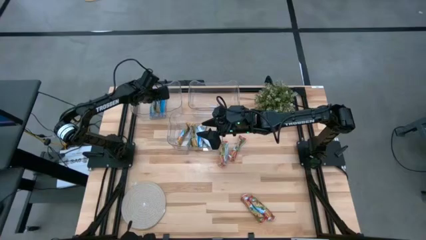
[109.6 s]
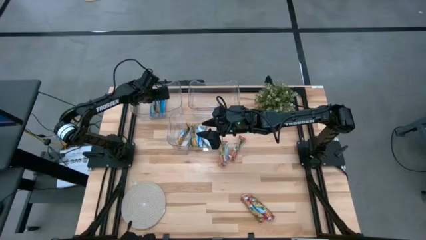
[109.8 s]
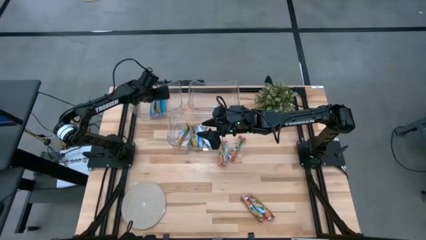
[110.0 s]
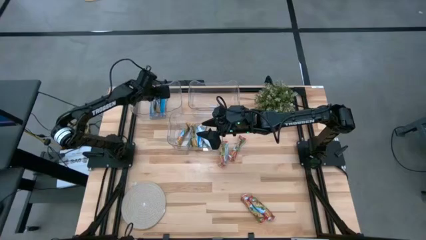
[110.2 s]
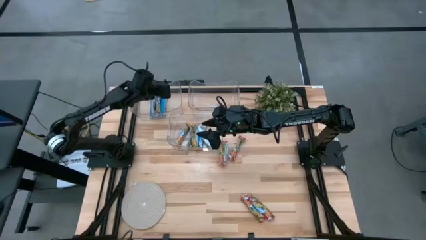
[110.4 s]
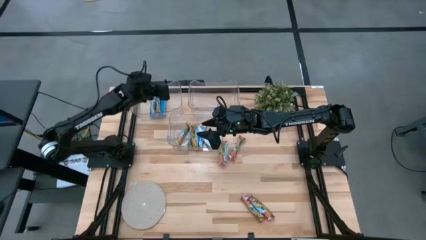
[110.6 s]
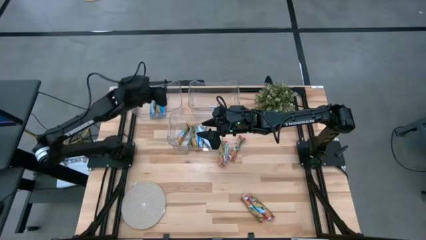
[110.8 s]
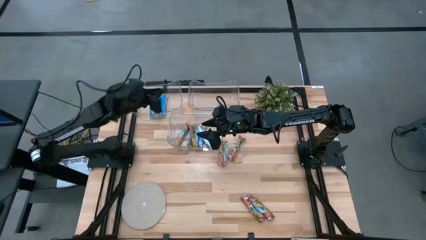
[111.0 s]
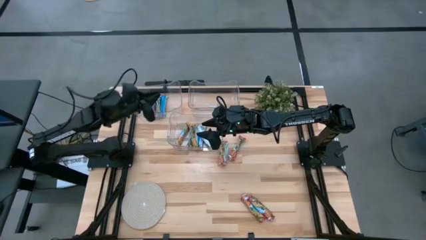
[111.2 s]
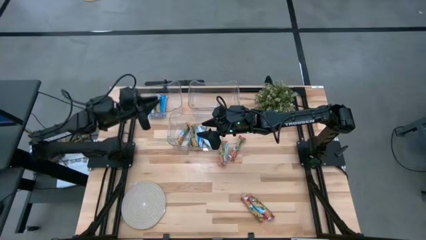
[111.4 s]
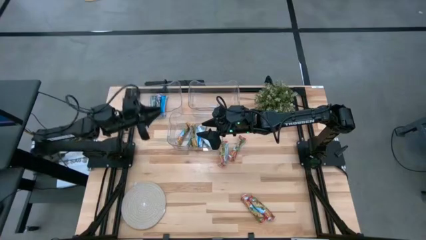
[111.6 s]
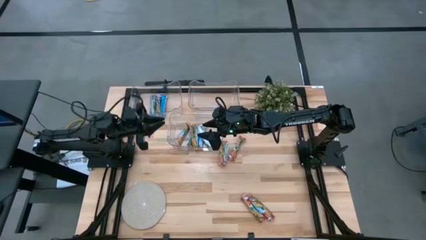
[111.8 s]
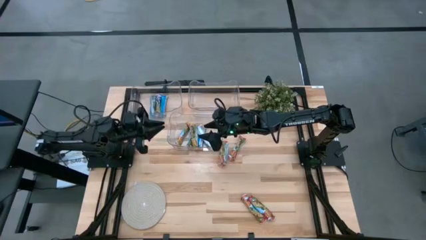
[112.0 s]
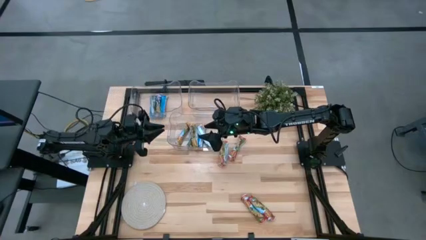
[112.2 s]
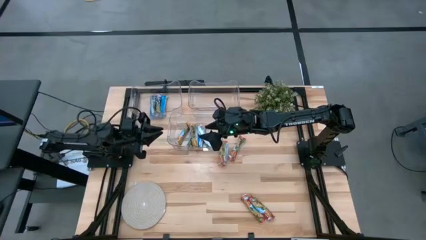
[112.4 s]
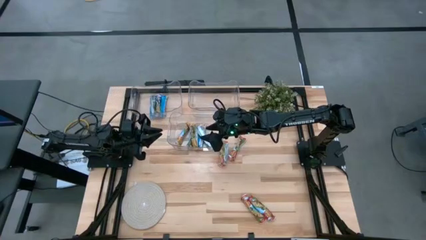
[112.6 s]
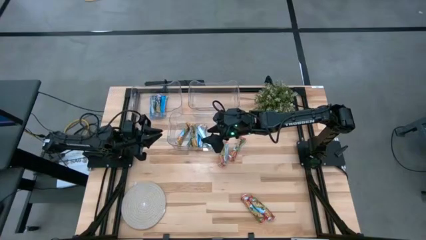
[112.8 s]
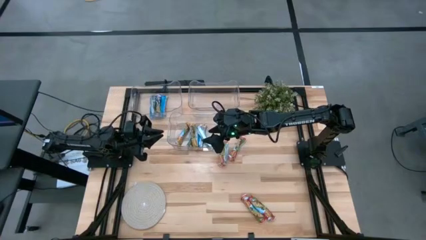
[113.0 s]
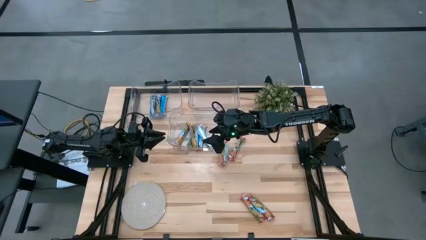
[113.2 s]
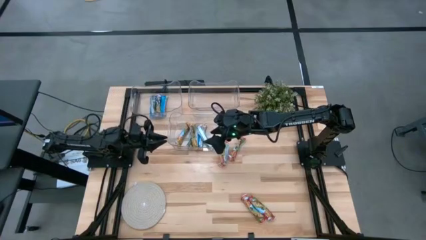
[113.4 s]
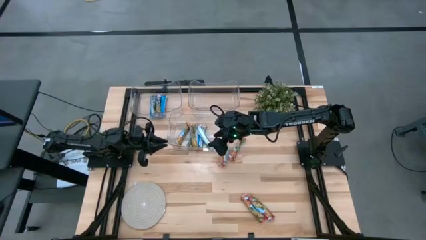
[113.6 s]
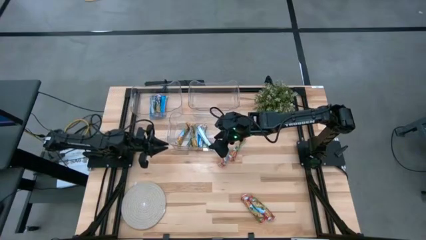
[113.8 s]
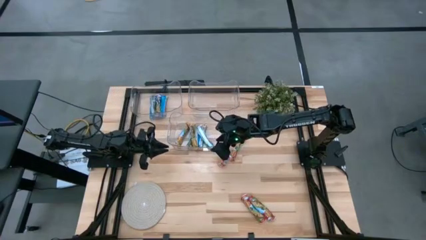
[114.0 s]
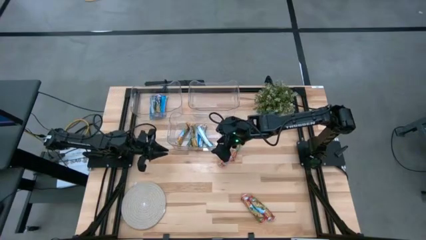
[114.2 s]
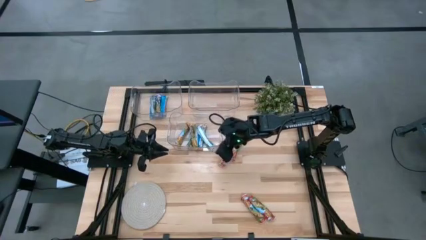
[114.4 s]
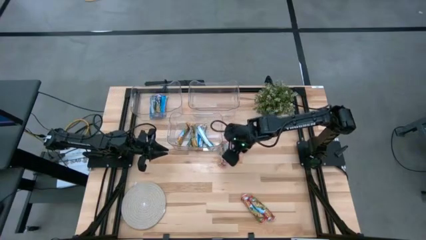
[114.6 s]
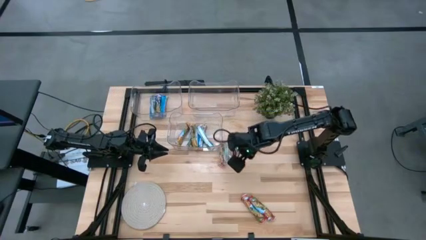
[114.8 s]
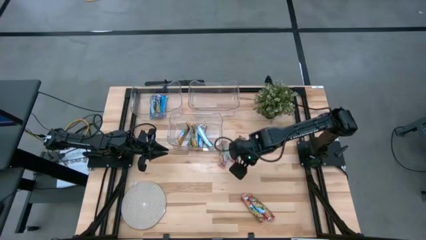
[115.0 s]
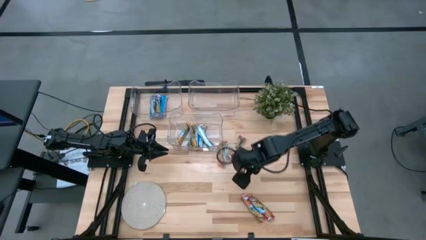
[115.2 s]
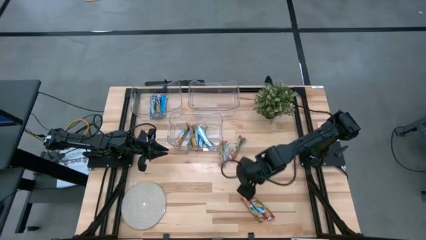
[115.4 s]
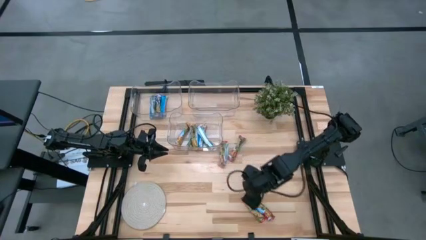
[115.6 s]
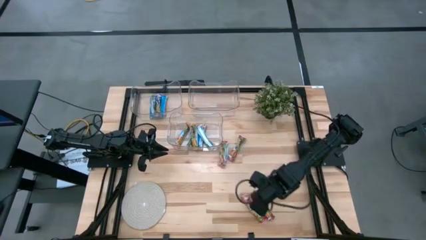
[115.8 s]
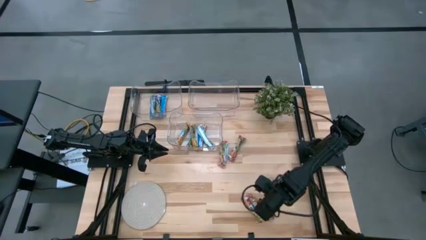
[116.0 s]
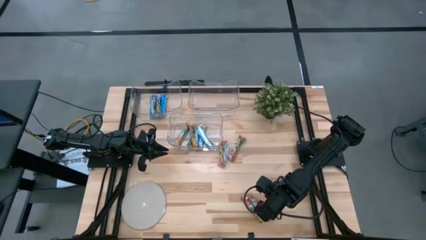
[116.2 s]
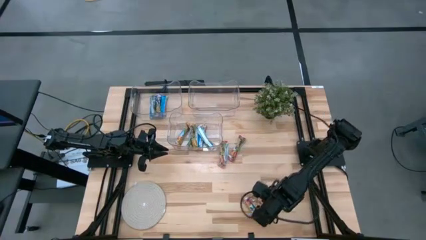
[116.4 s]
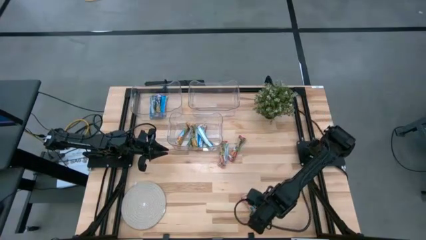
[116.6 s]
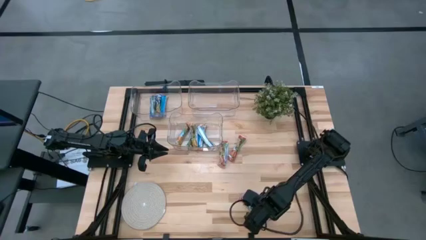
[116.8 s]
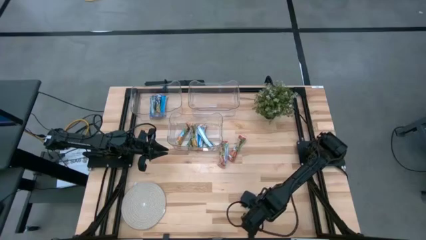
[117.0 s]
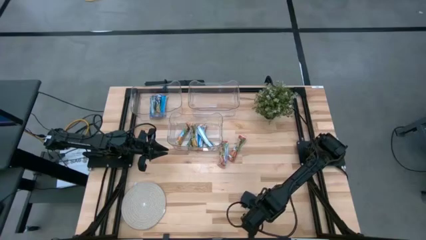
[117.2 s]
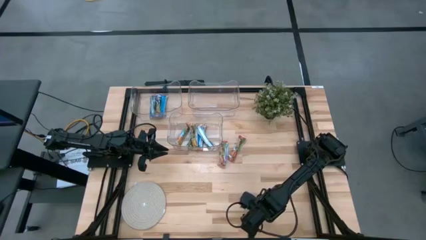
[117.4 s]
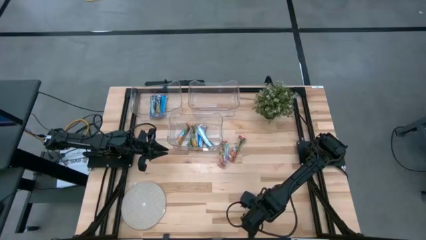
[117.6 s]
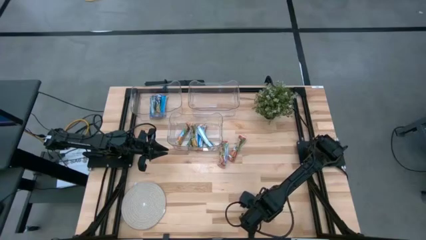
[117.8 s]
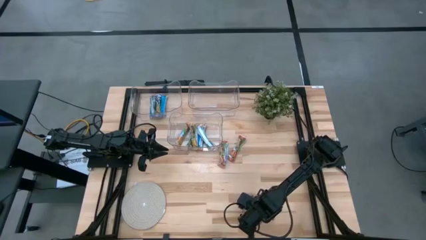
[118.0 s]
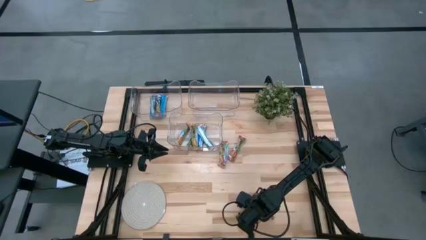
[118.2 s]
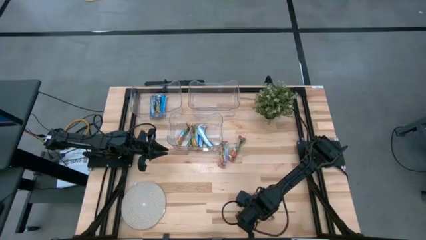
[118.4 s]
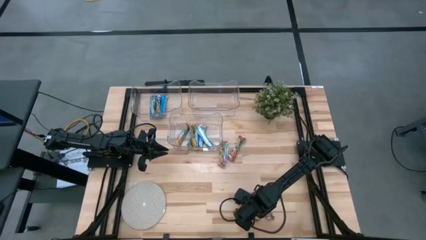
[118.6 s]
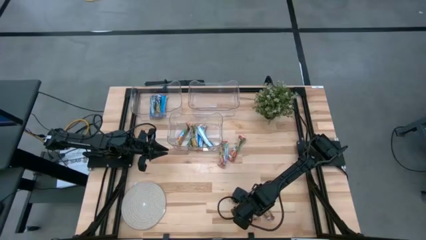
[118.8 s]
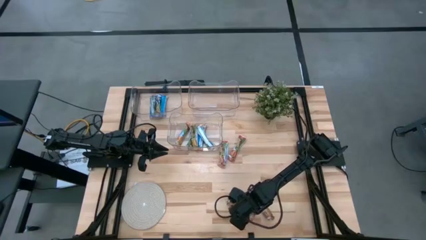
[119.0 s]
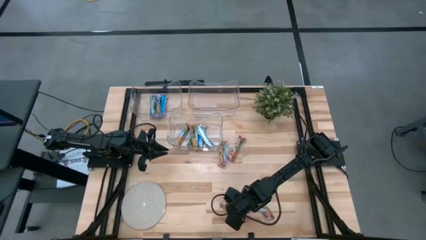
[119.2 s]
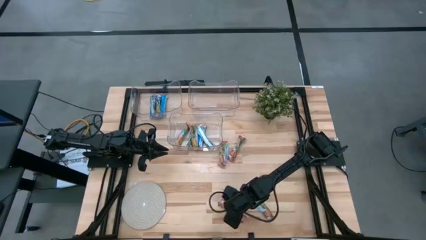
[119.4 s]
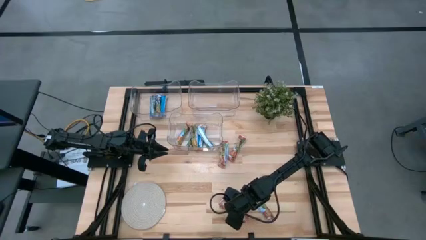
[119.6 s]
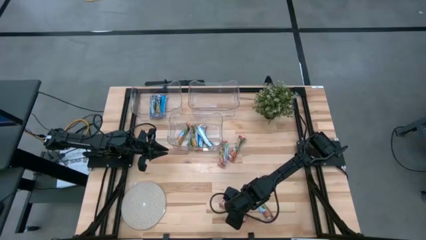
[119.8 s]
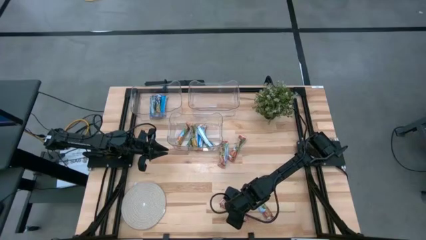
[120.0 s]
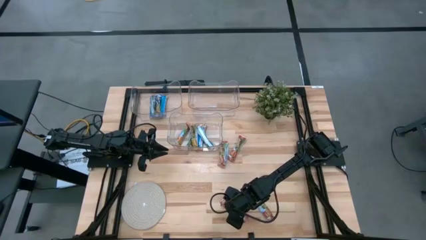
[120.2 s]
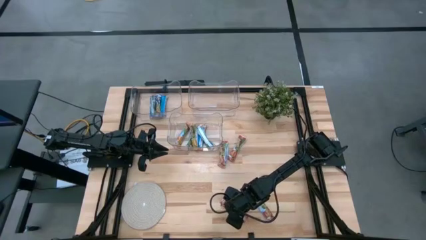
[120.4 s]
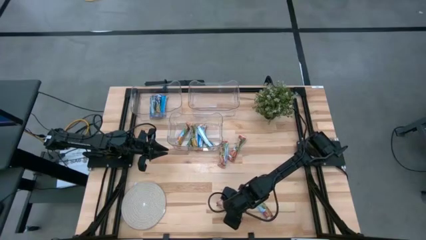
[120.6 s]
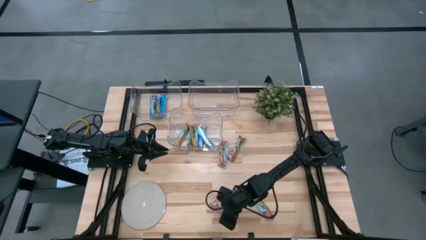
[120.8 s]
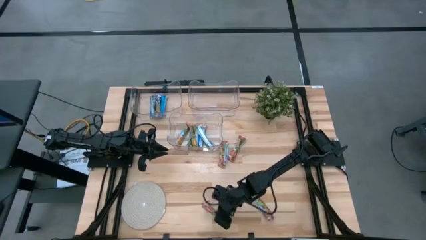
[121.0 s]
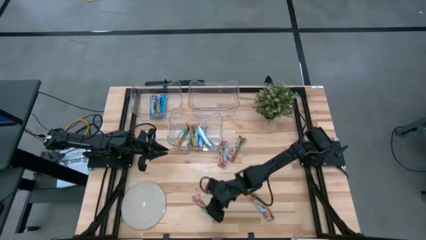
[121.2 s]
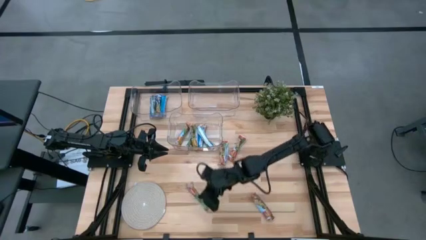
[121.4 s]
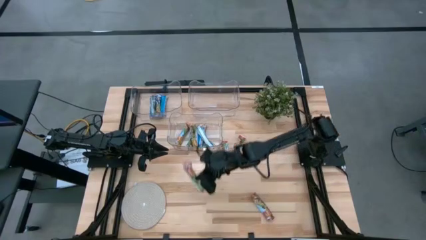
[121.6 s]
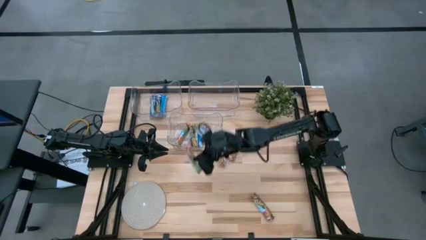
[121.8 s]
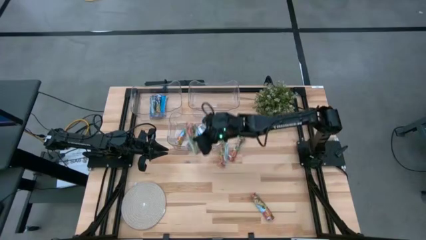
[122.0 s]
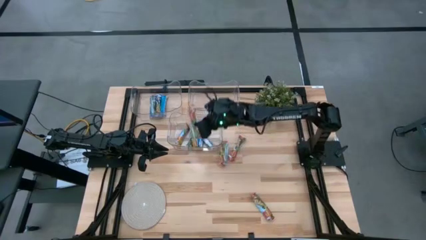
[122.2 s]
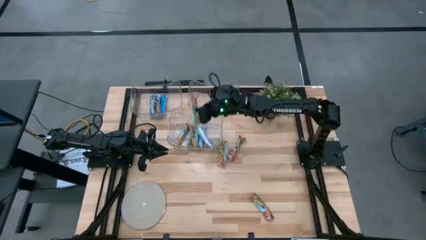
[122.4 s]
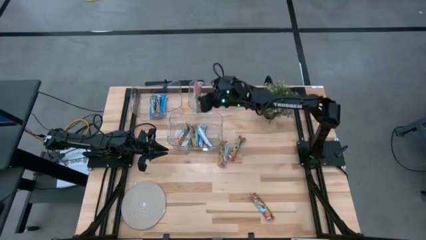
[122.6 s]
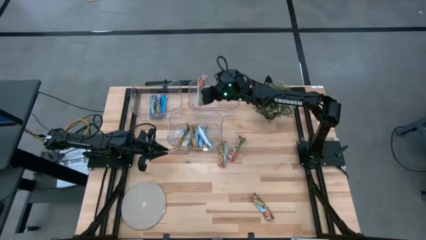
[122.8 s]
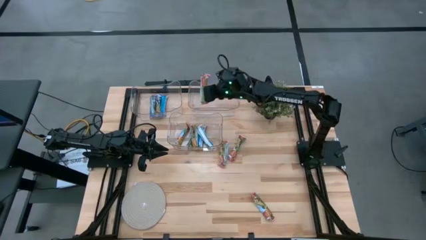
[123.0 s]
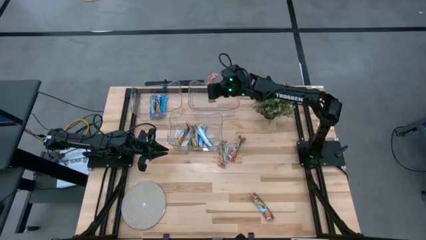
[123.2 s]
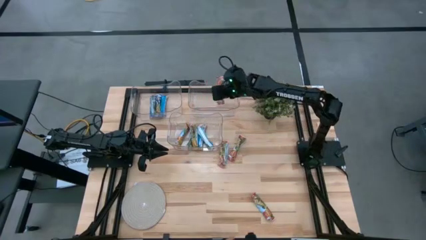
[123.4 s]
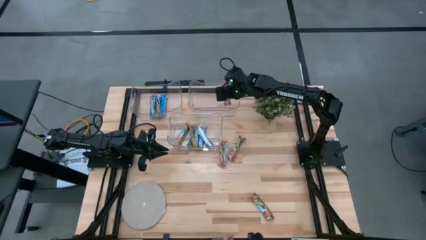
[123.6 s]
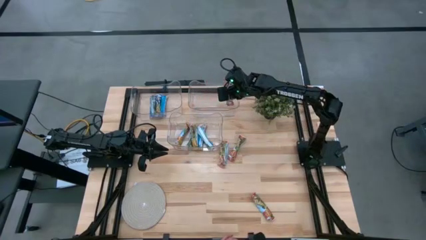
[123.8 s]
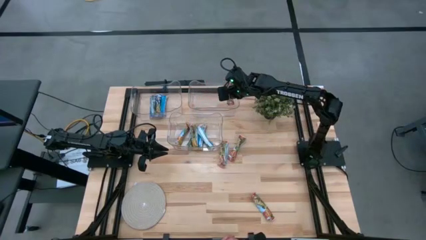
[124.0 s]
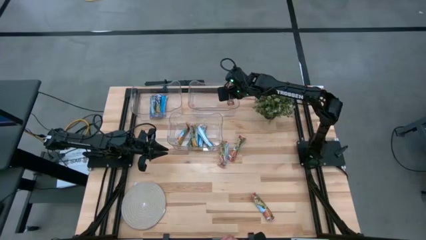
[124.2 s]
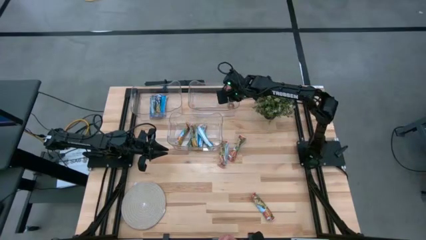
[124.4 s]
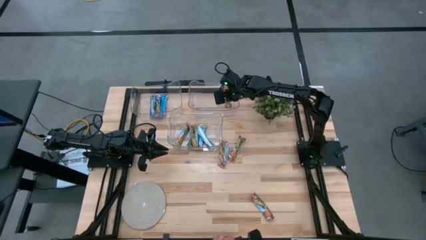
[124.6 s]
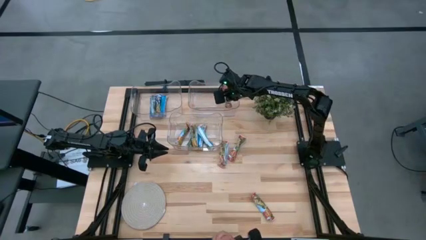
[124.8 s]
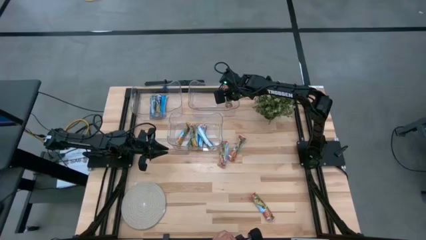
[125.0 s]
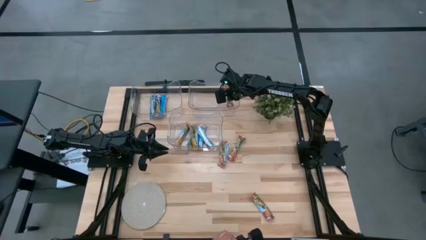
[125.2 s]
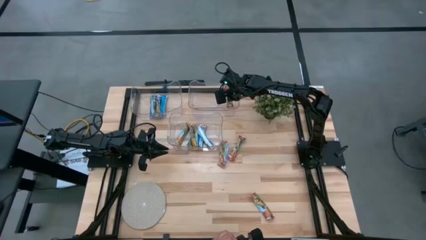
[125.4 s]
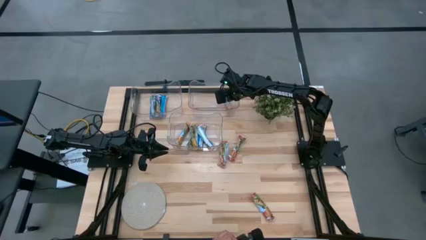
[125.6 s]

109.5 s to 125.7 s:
Task: Pick and place Granola Bars by type
Put the red granola bar into the top right transparent bin
